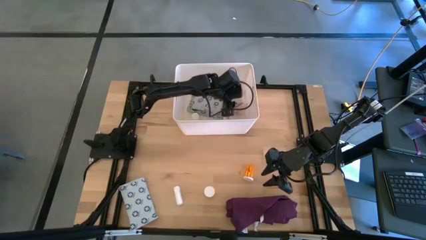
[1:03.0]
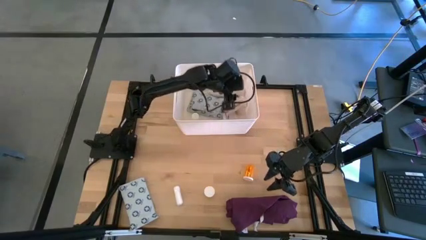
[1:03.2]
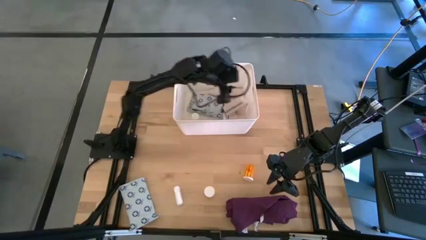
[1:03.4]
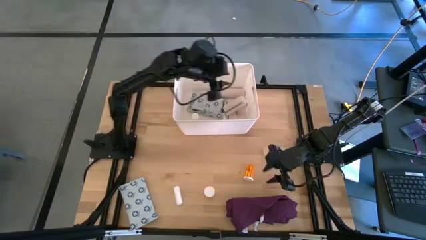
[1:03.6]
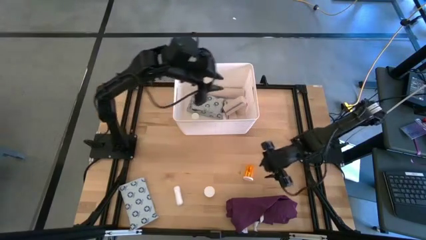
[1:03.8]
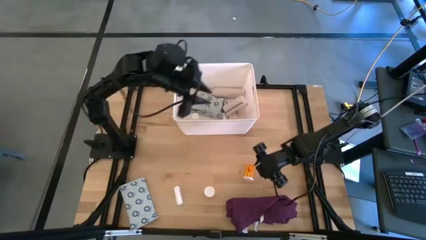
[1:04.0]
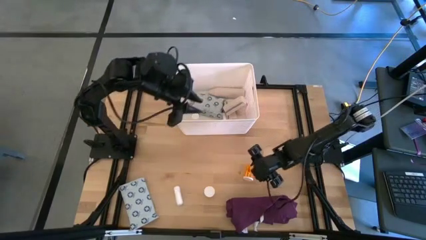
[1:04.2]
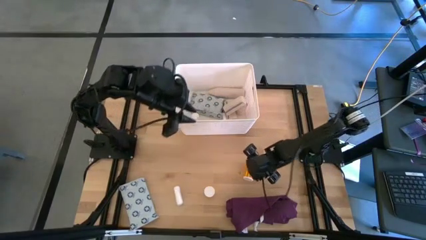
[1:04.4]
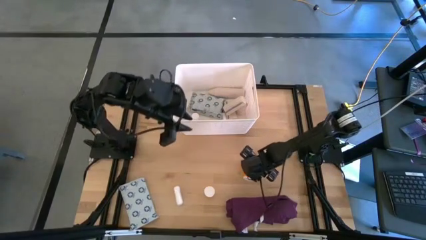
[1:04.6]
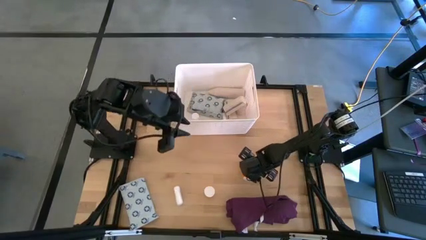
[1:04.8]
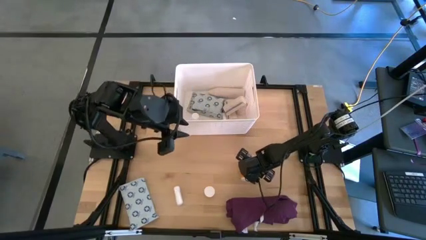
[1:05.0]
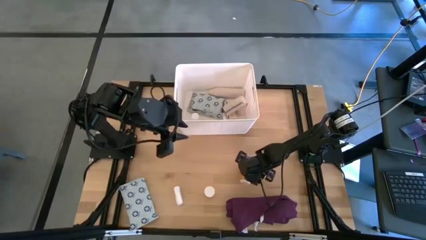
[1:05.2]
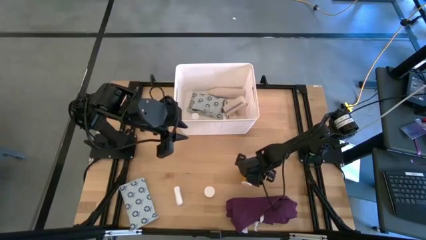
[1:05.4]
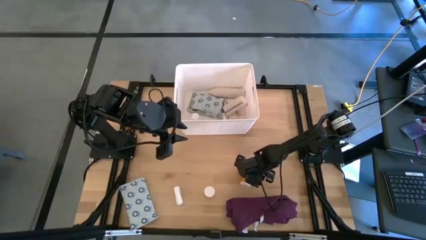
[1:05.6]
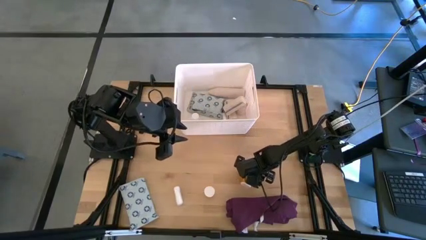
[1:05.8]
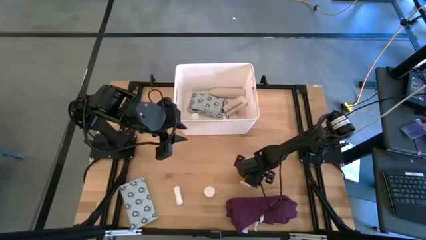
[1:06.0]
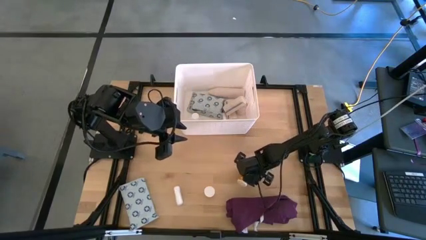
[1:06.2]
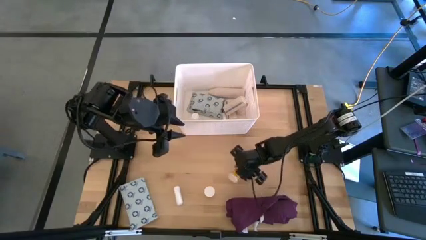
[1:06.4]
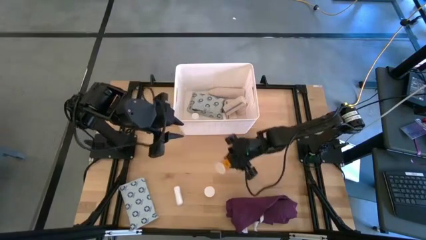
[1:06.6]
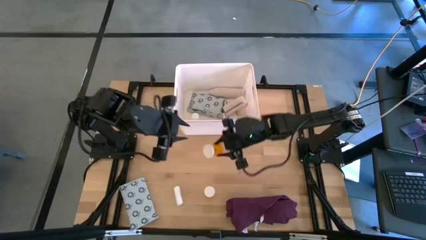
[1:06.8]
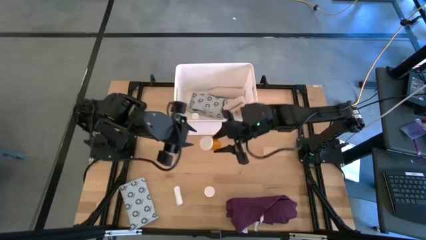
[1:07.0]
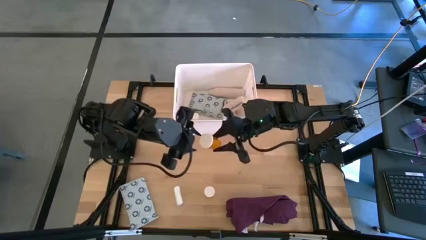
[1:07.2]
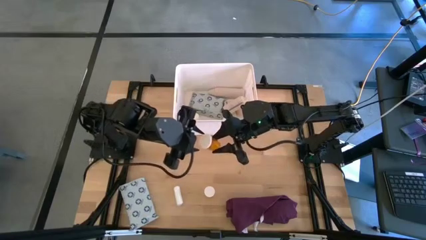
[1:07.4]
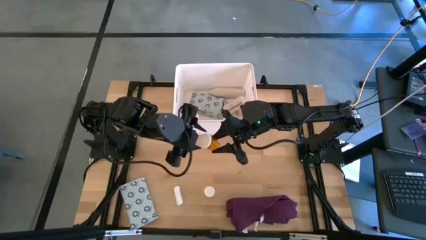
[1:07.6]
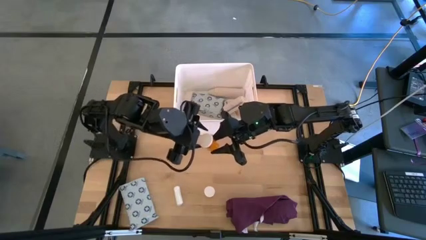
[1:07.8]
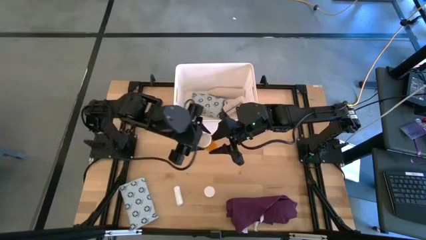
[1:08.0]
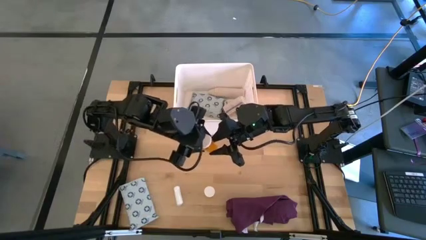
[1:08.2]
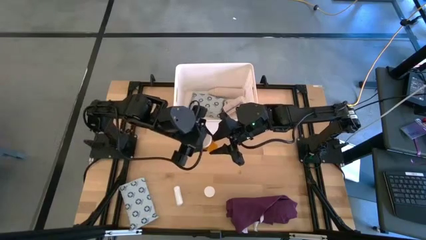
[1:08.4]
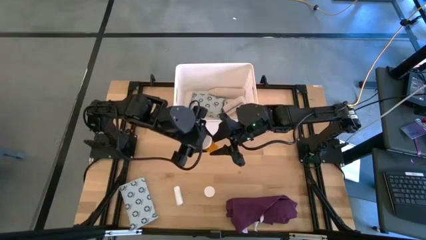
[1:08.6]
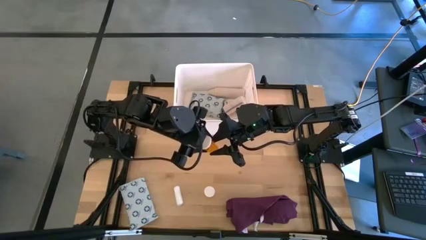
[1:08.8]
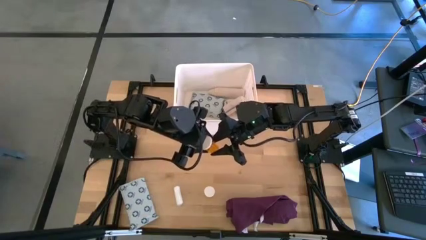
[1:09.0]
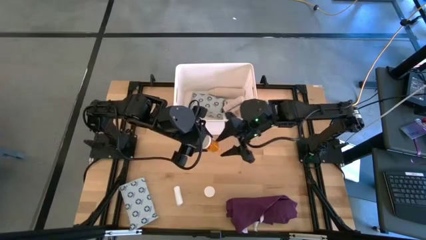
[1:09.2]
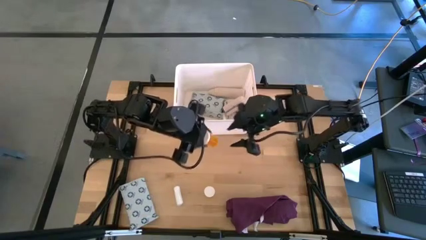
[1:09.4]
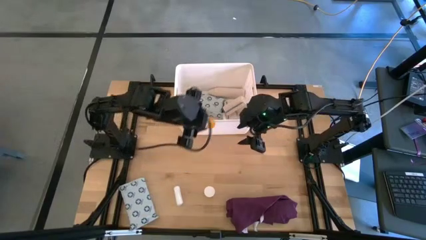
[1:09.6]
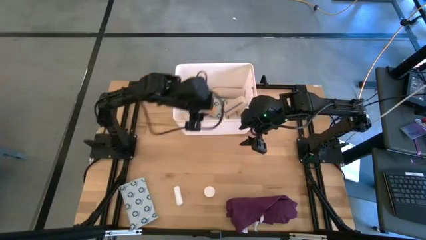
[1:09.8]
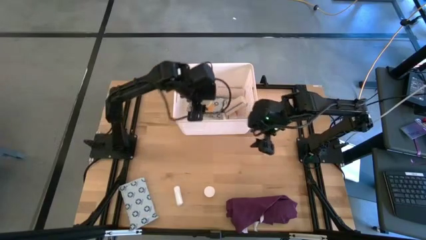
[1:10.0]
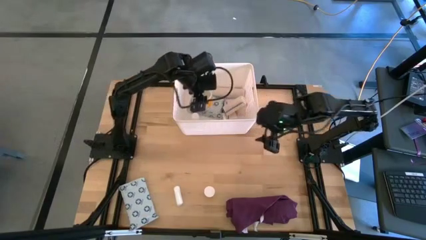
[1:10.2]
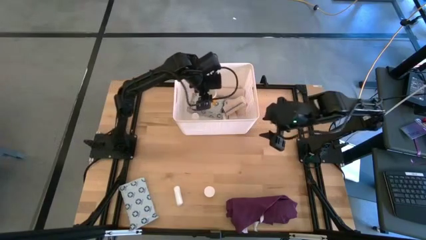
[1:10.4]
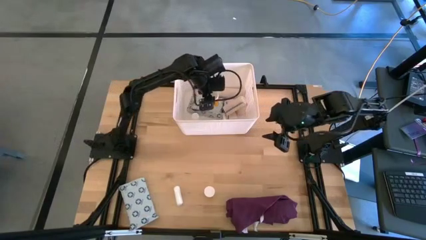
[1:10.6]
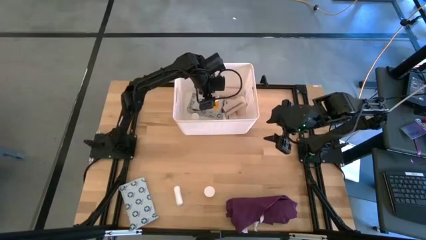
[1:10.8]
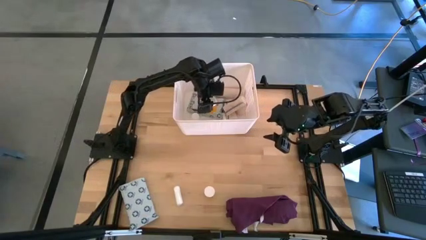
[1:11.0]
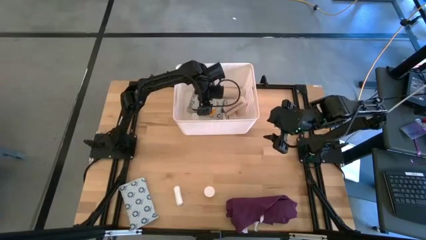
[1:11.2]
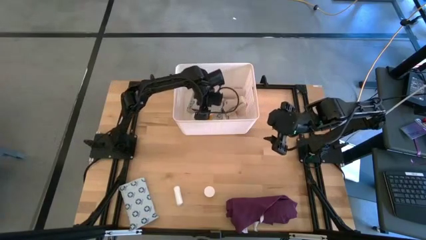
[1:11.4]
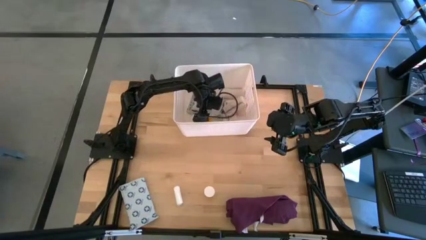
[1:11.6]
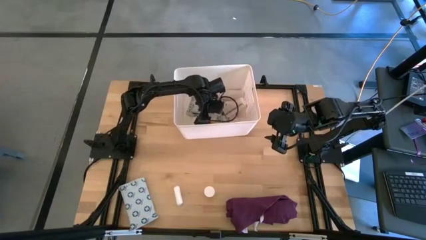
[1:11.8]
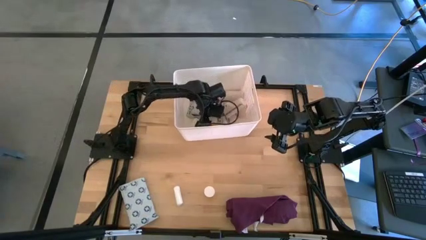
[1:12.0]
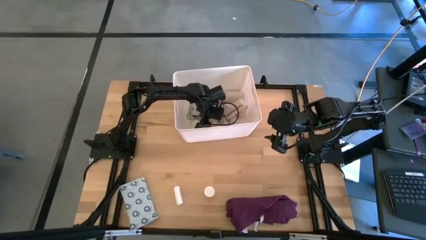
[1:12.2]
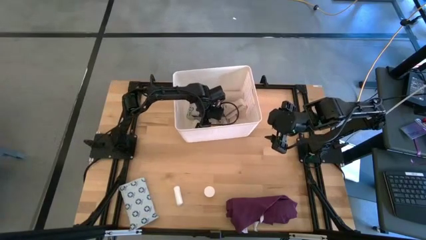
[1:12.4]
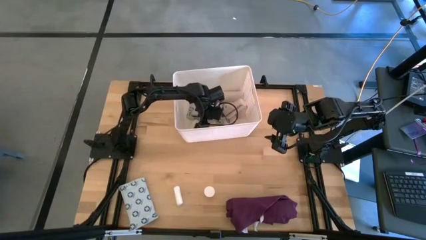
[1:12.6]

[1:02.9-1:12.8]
Task: Pick & place medical supplies in basket/bin
Put the right orange pill bottle into the white bin

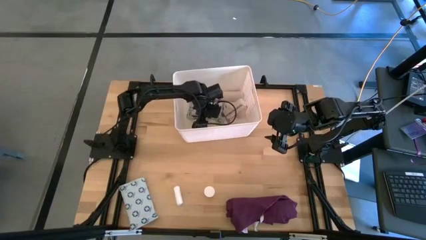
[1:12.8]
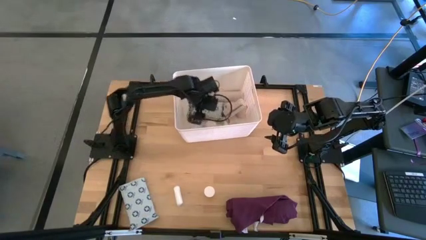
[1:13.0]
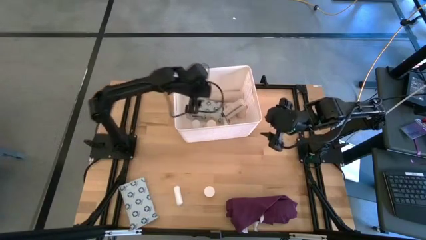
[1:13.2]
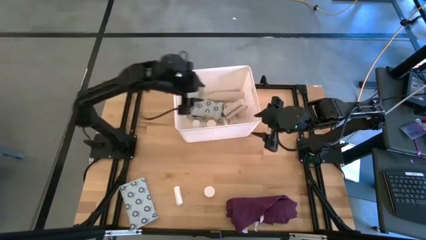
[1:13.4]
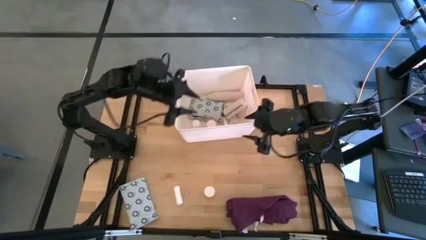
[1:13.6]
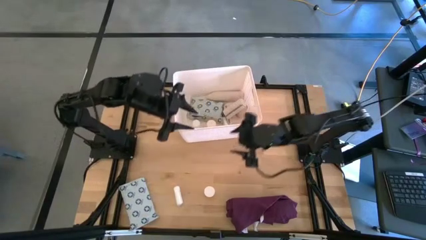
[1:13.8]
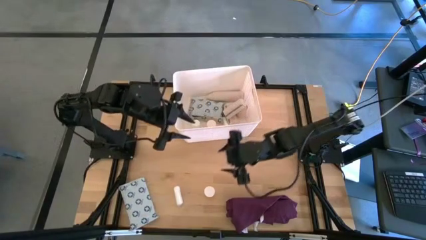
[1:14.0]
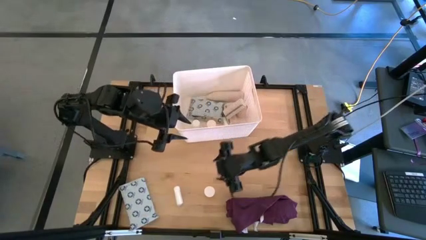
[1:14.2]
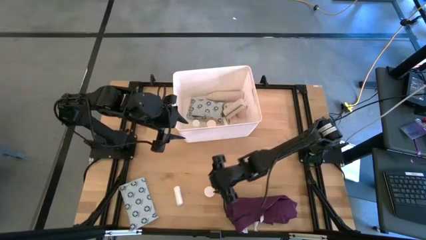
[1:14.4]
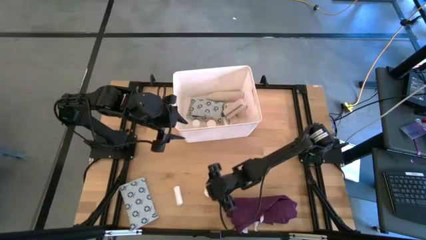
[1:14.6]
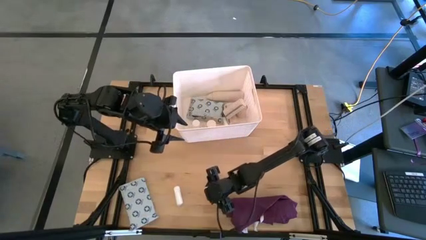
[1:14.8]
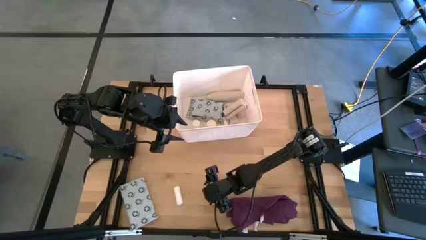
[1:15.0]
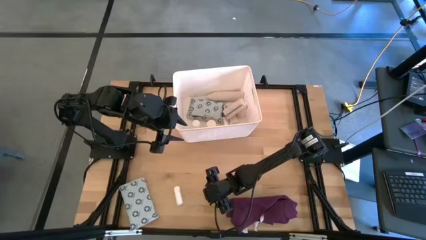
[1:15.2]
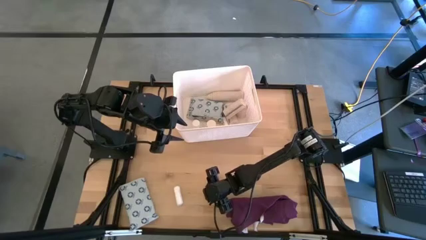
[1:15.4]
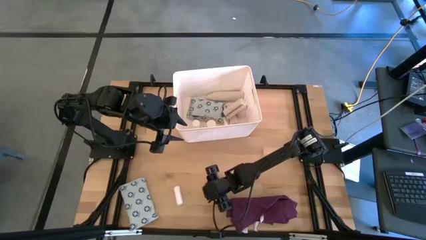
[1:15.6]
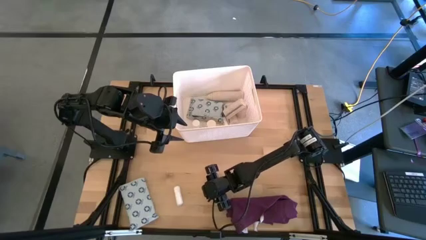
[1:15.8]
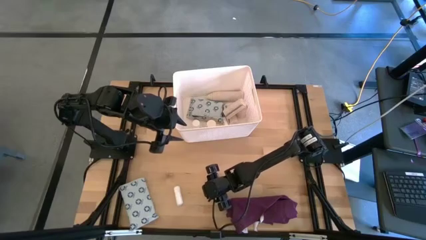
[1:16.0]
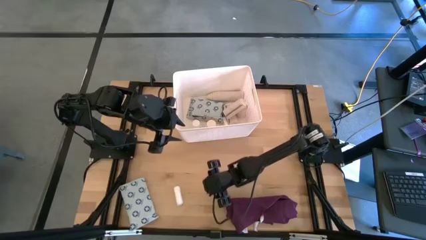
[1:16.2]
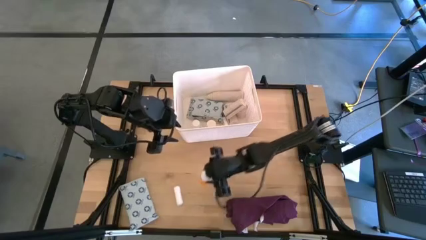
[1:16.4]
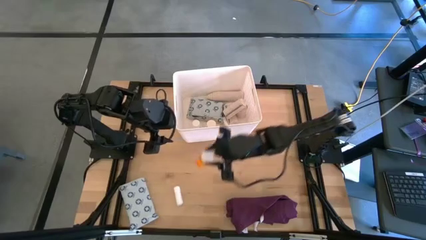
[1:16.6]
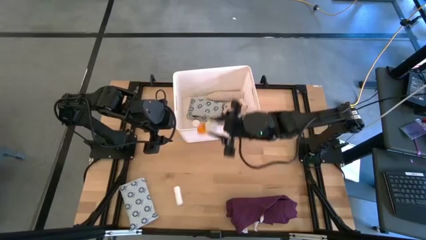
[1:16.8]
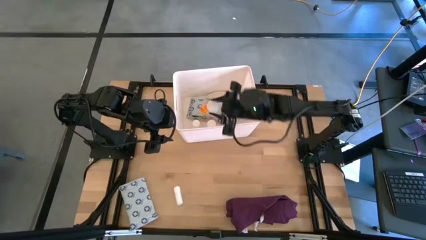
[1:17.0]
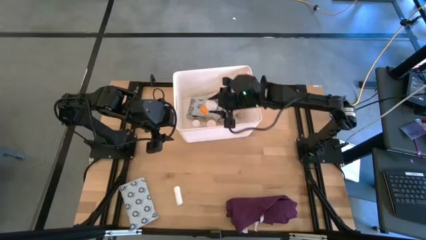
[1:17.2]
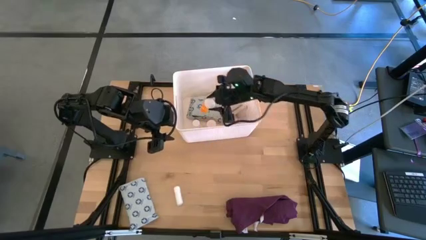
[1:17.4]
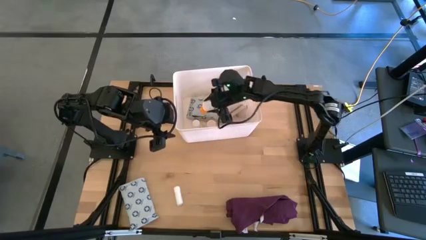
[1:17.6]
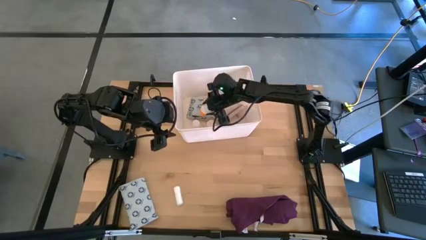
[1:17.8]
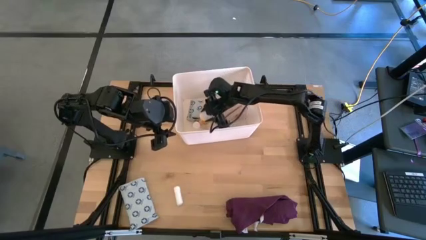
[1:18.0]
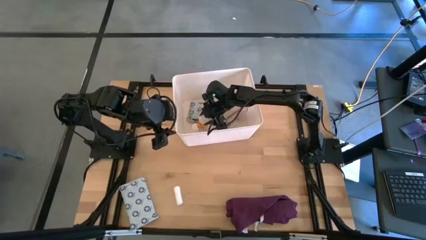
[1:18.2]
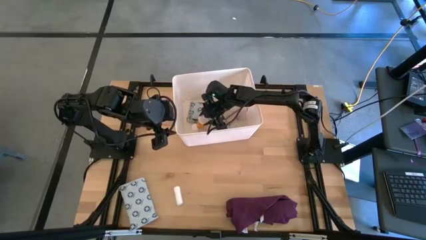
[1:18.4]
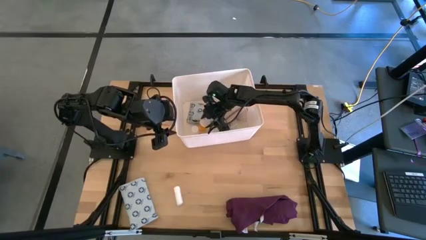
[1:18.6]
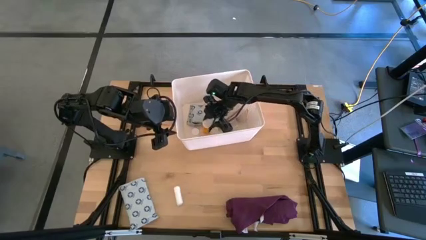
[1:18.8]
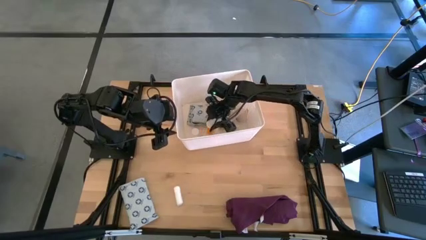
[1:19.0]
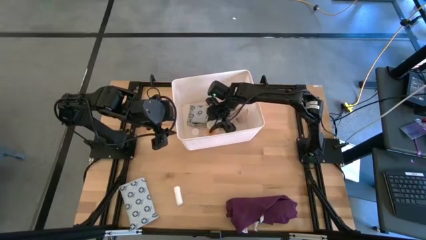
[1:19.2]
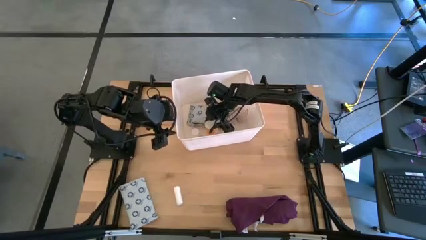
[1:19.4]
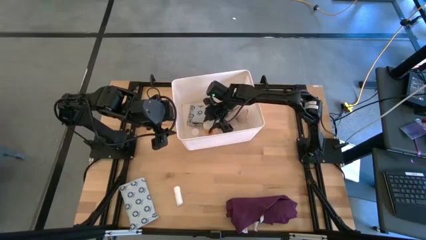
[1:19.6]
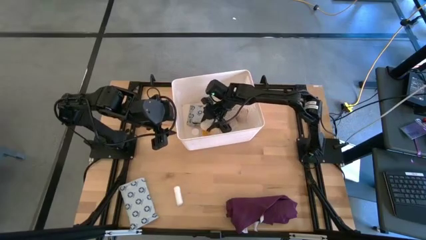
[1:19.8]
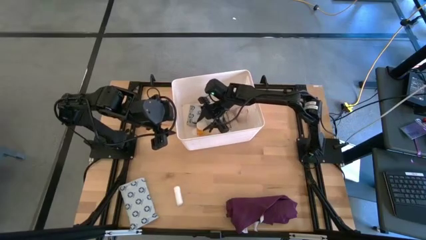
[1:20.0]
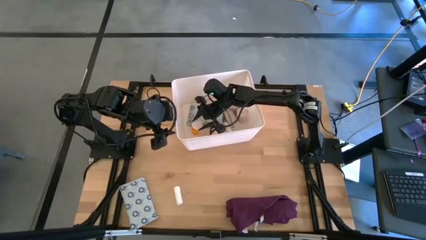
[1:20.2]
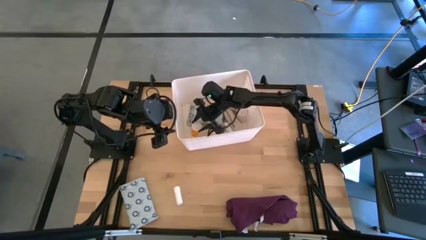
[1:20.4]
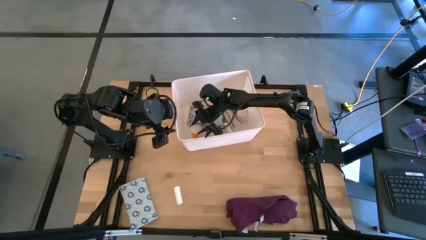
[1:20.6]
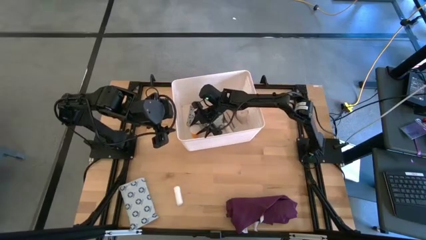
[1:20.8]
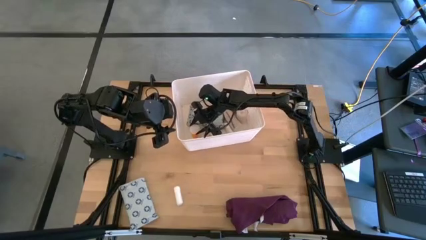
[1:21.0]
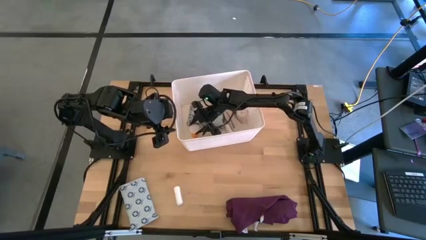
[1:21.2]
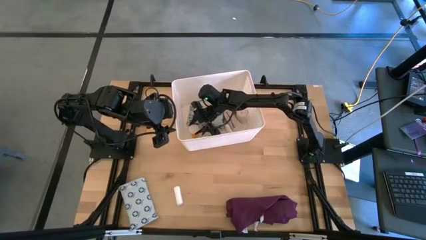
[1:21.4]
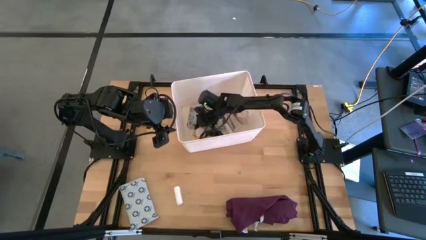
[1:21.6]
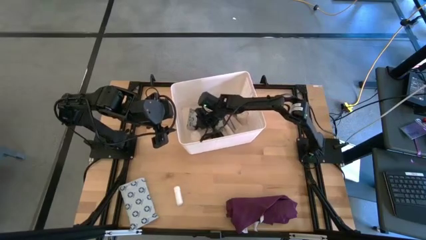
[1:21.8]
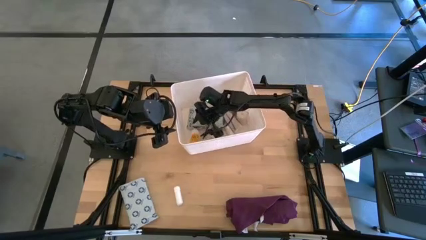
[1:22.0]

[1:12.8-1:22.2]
Put the orange pill bottle into the white bin
